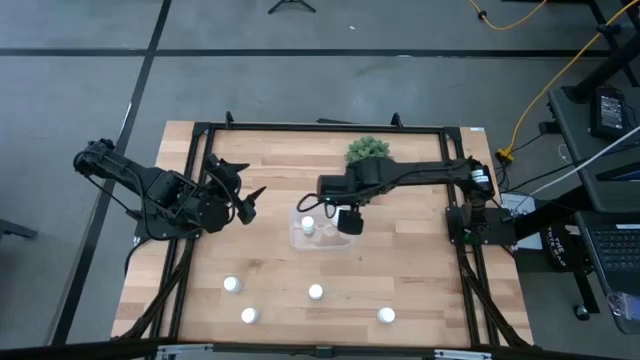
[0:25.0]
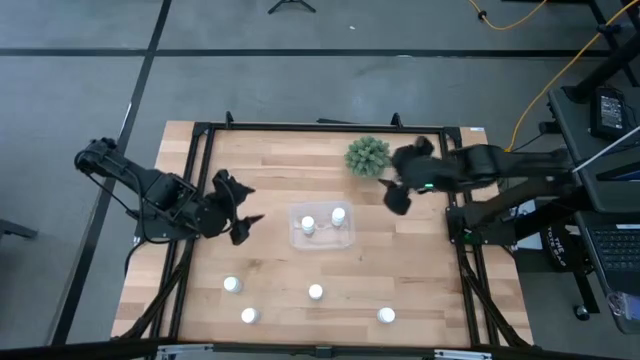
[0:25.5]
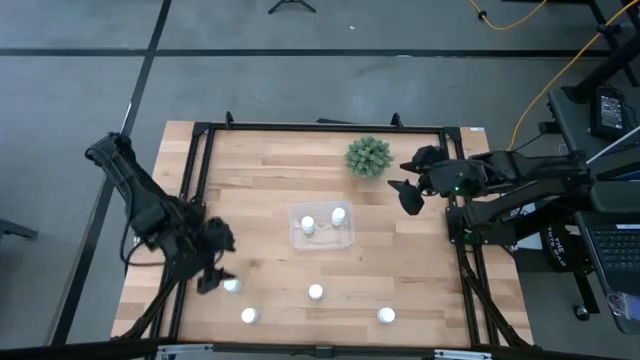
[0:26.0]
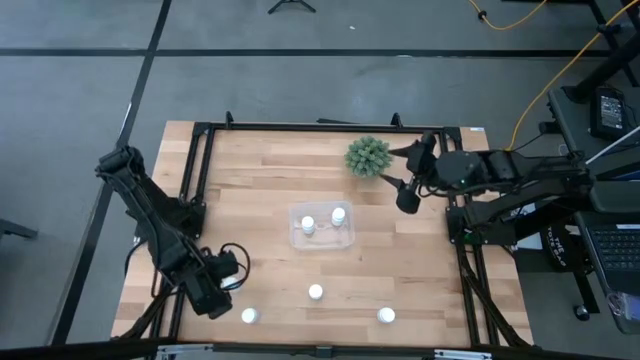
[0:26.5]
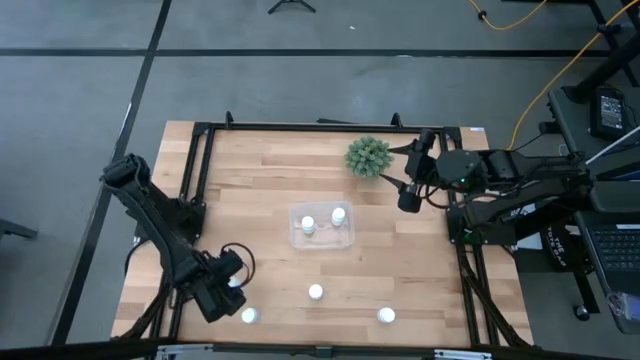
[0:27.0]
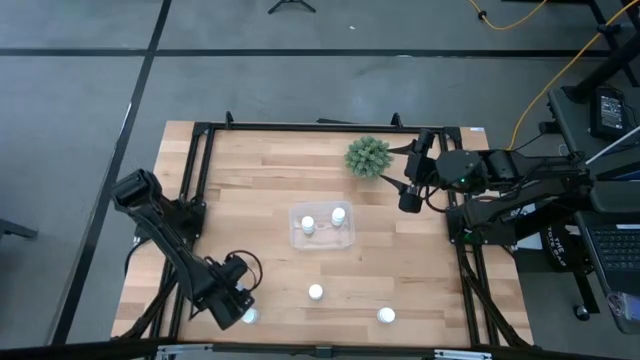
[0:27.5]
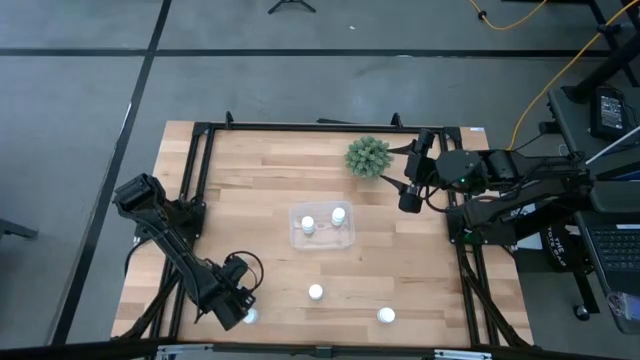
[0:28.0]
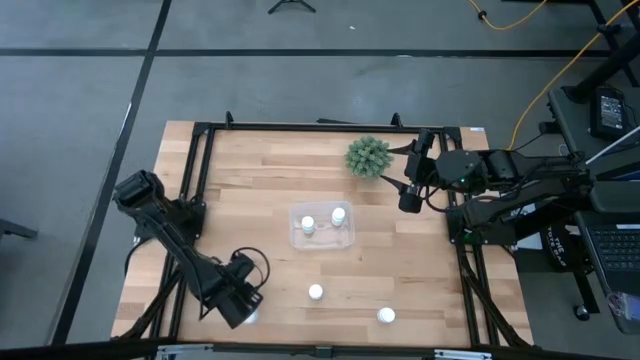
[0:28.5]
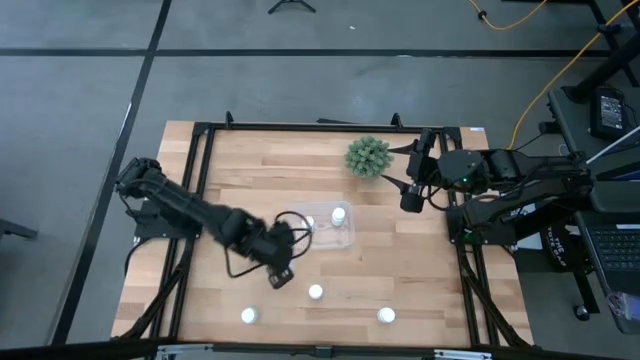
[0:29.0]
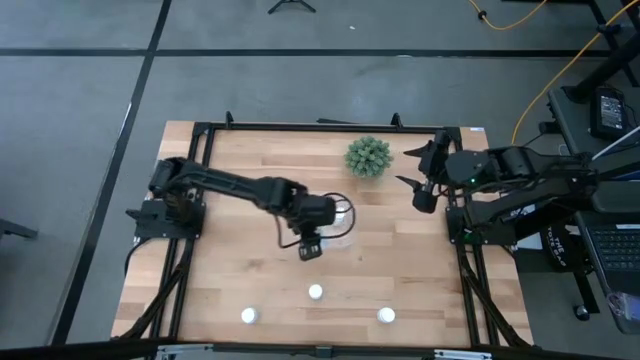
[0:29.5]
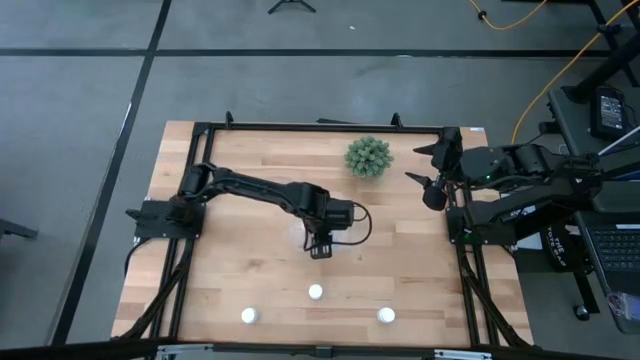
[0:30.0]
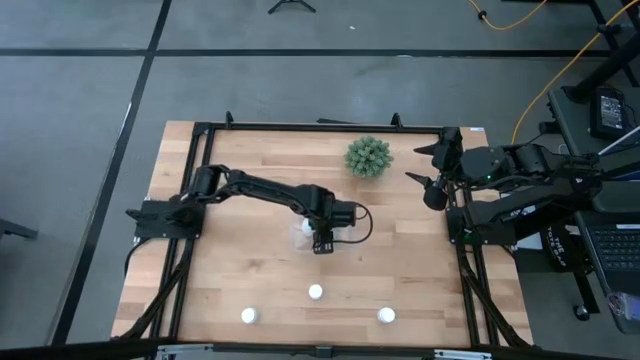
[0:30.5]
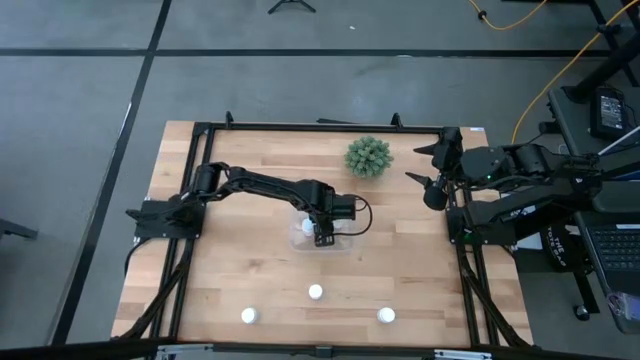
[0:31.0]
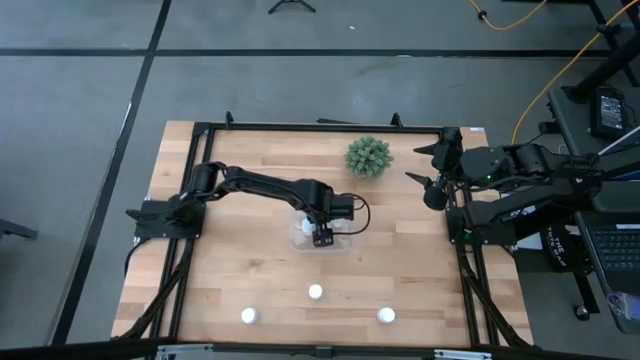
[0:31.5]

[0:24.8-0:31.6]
Task: Pick and place pill bottles into a basket
Put the white pill bottle into the transparent bin

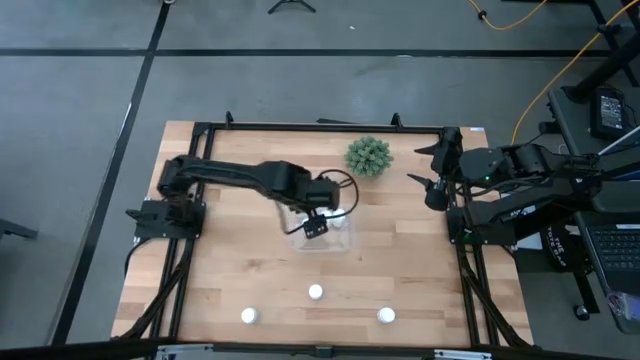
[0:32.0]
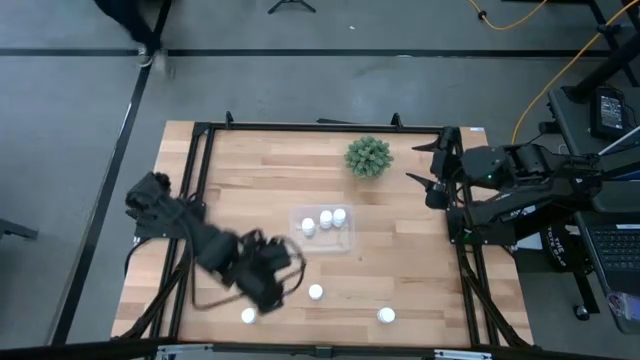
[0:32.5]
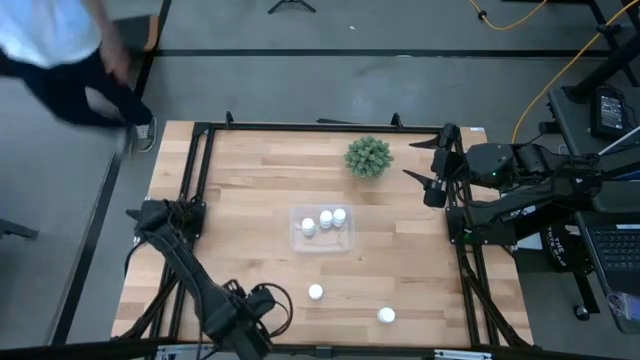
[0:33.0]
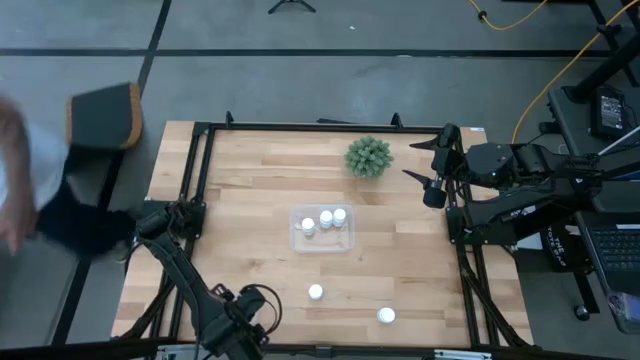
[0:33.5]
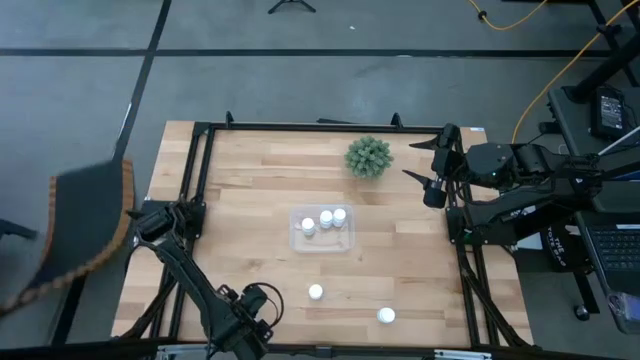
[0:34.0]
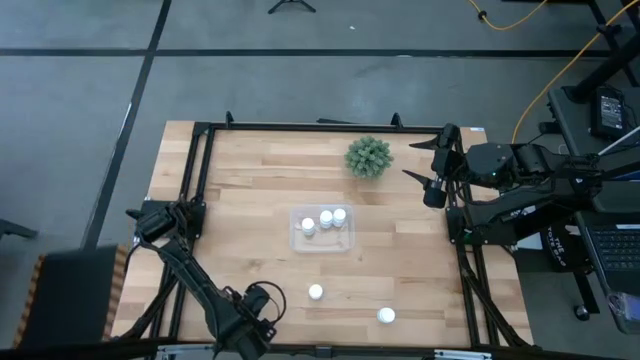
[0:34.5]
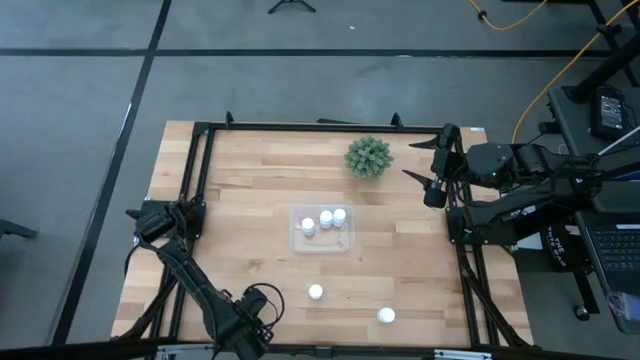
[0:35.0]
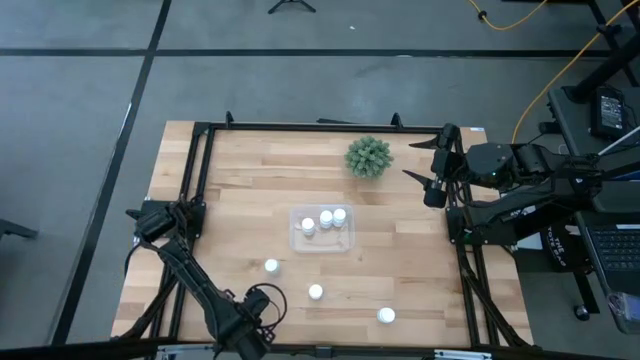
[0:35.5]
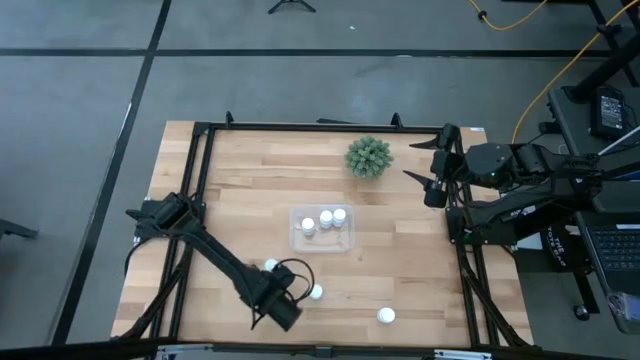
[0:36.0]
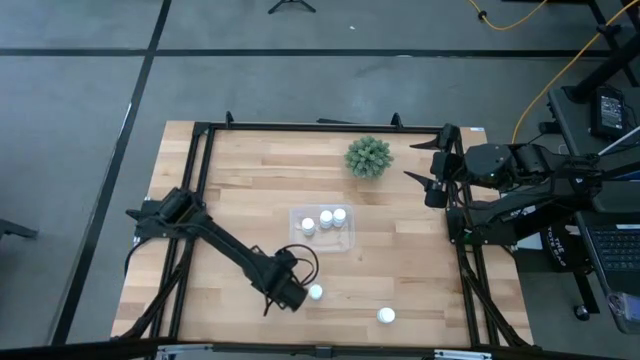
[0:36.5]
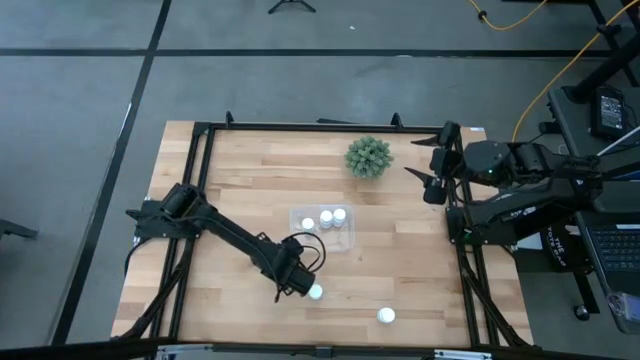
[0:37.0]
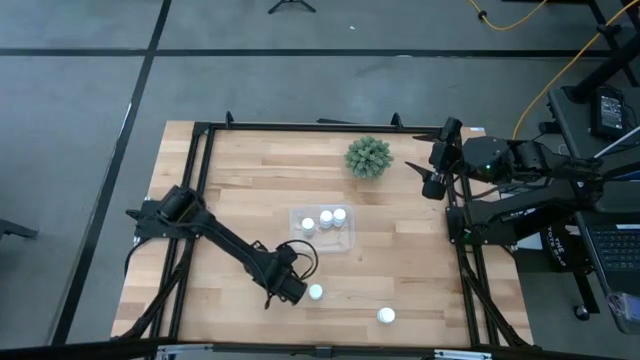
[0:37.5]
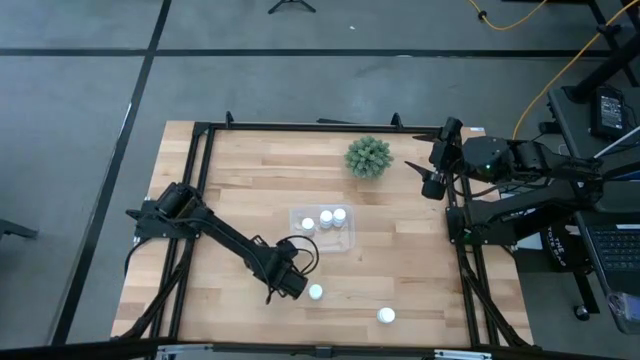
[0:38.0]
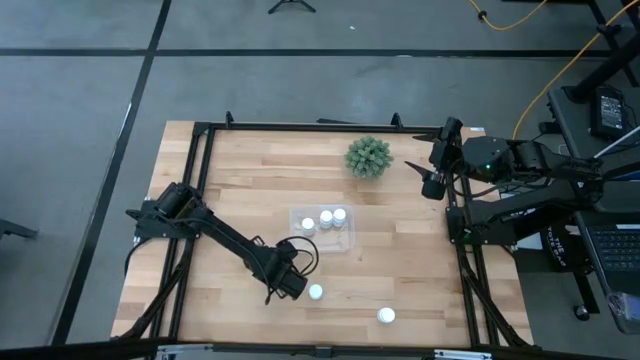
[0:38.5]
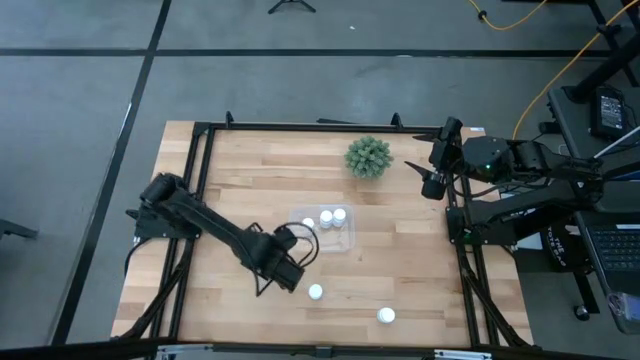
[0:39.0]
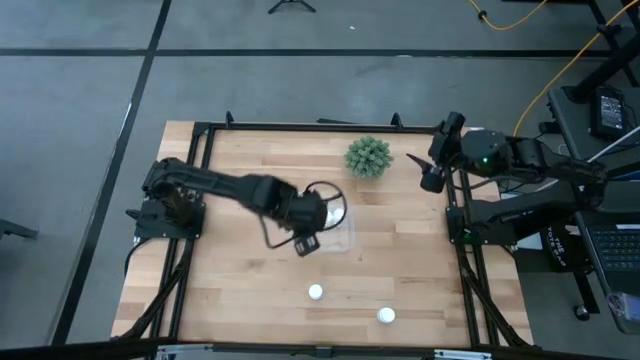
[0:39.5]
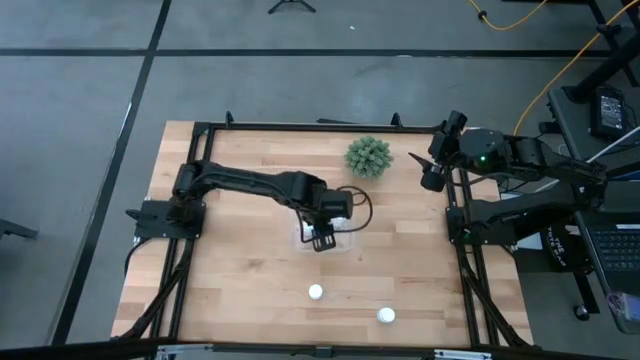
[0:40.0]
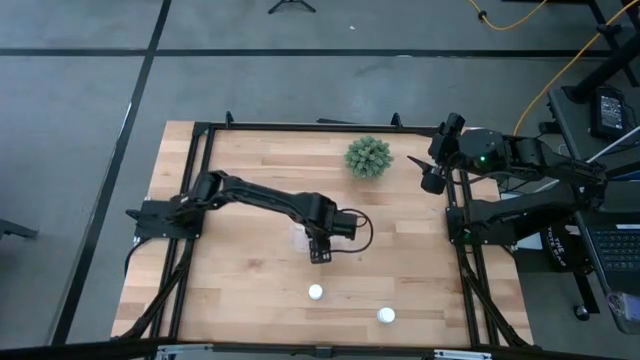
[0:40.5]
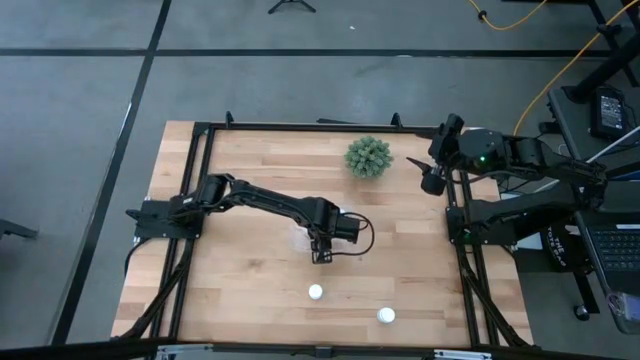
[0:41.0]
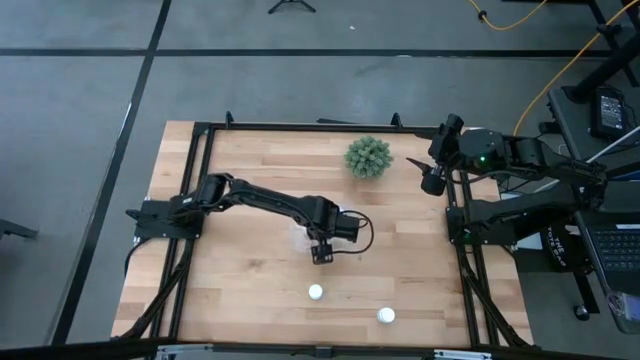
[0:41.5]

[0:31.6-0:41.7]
Put the white pill bottle into the transparent bin

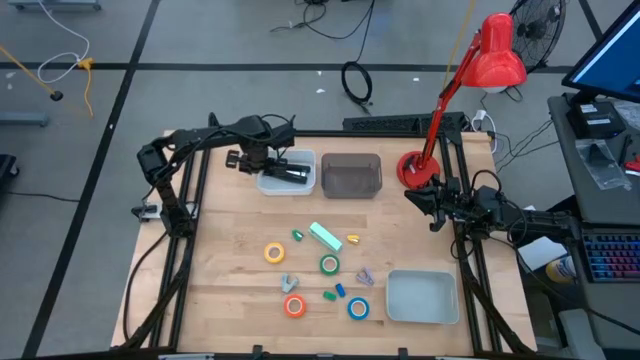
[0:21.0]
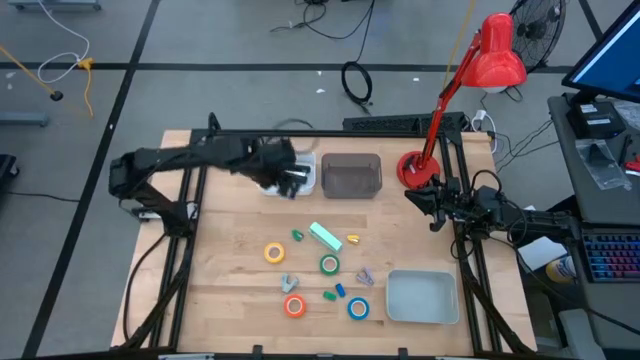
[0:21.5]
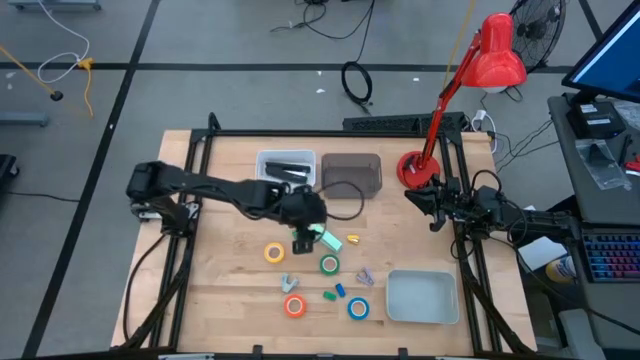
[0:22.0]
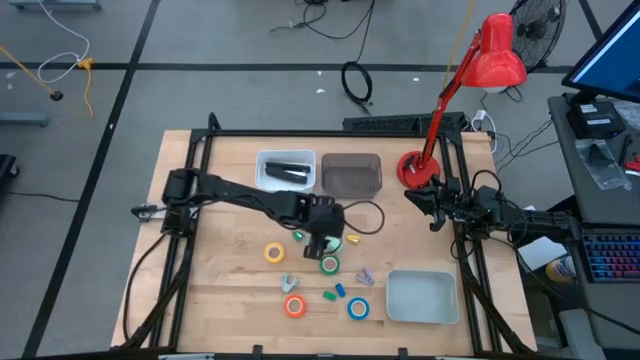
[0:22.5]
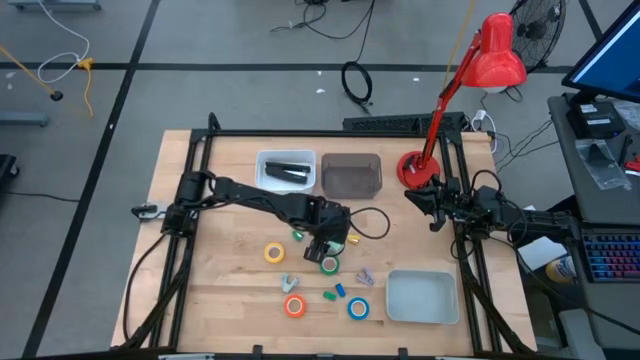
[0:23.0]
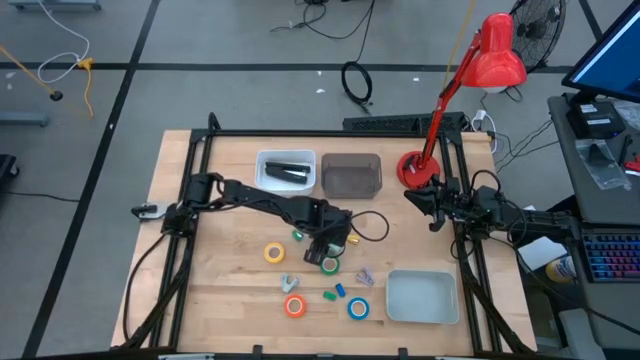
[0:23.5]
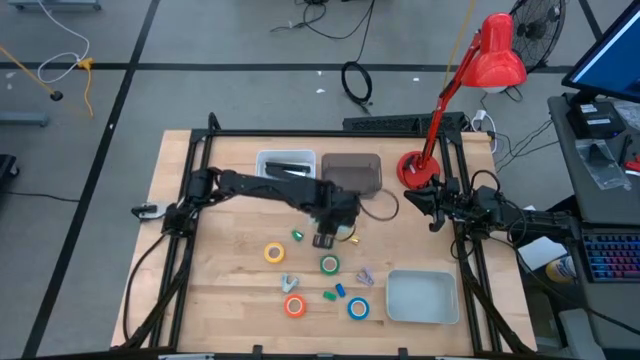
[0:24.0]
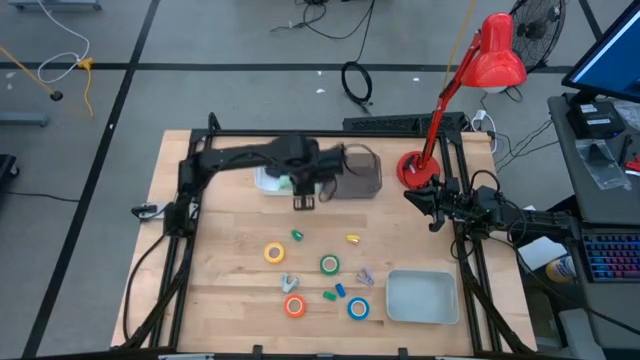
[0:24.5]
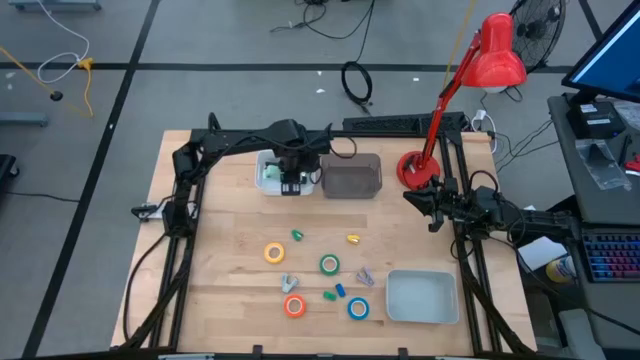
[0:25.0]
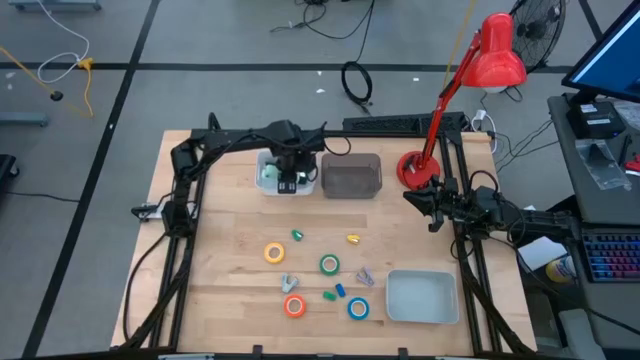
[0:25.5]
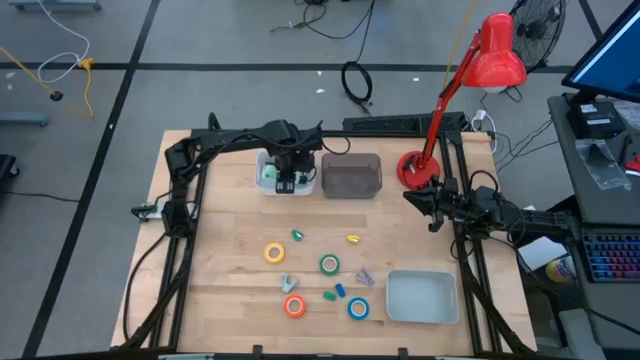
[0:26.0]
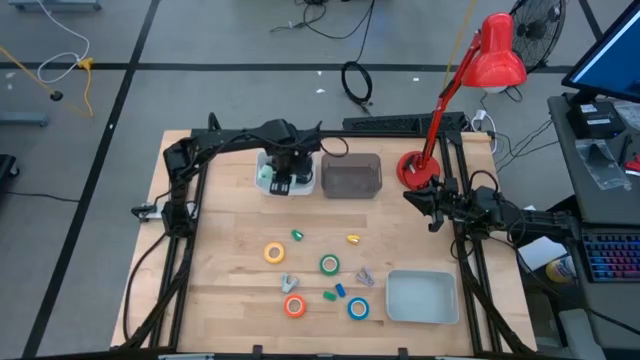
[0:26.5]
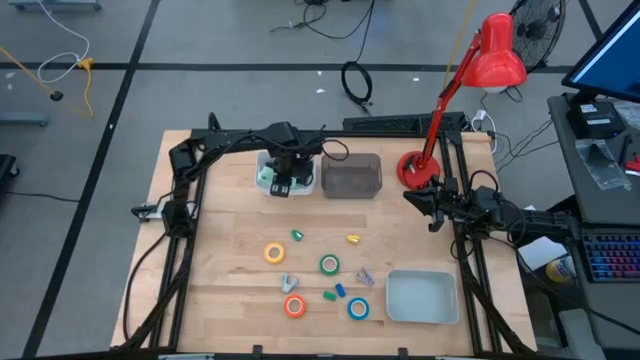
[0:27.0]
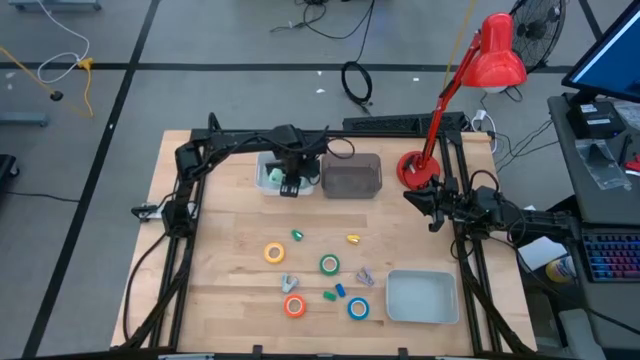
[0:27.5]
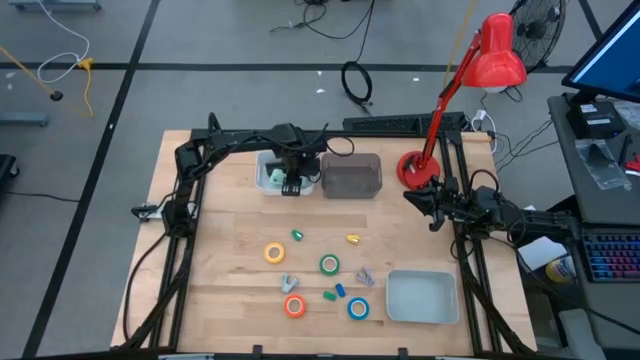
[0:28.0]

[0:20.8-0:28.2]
Task: Pick and place Stapler, Stapler remover, tape
Put the large light green stapler into the white bin
